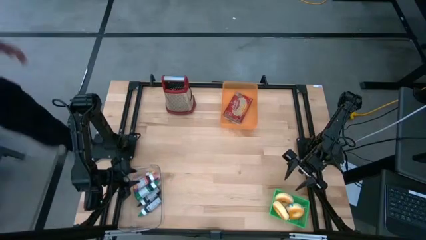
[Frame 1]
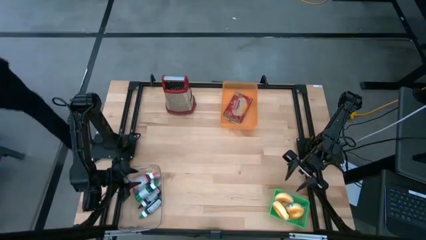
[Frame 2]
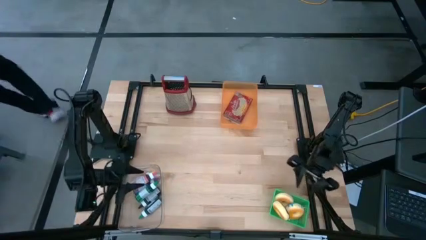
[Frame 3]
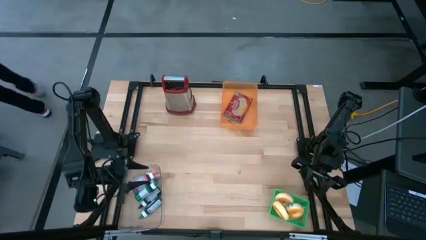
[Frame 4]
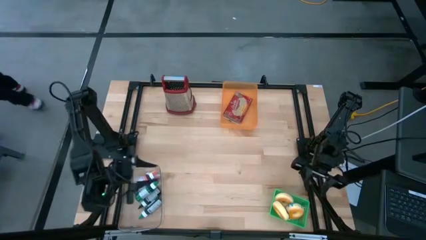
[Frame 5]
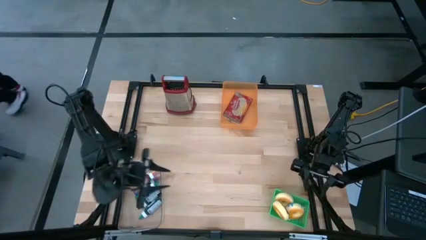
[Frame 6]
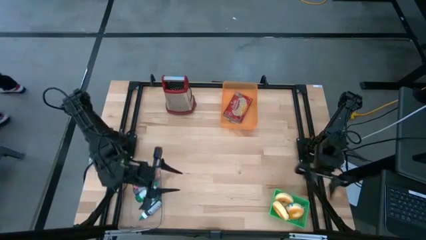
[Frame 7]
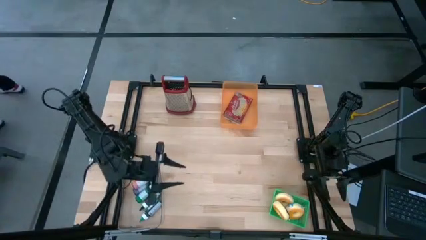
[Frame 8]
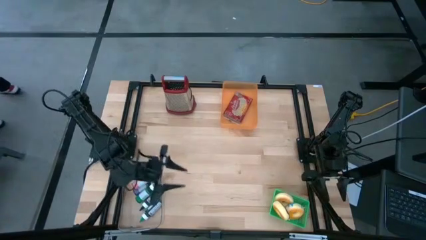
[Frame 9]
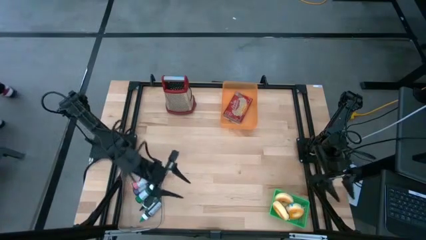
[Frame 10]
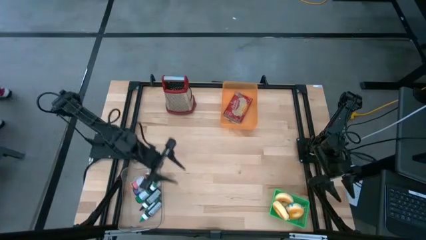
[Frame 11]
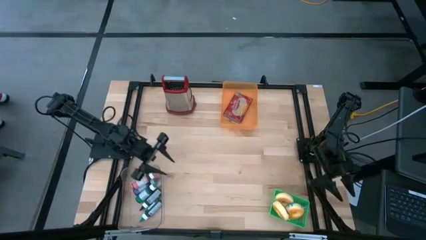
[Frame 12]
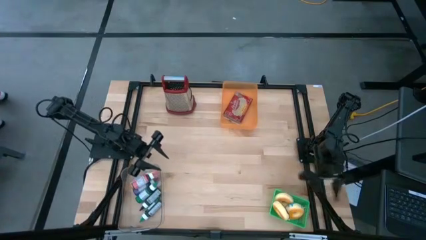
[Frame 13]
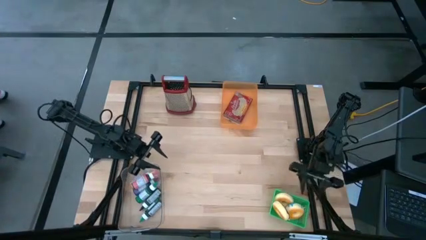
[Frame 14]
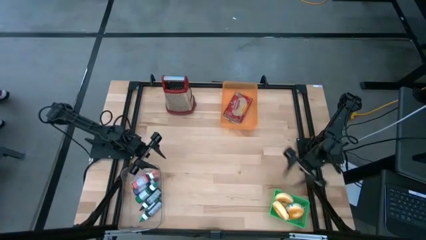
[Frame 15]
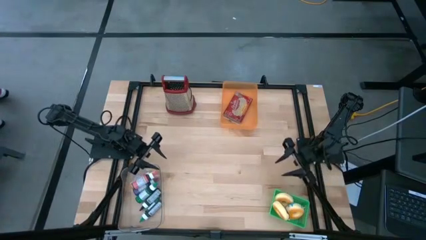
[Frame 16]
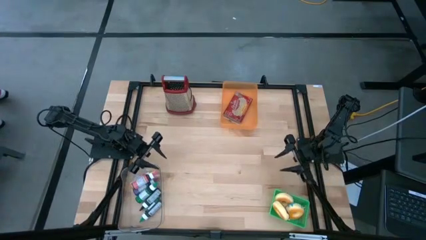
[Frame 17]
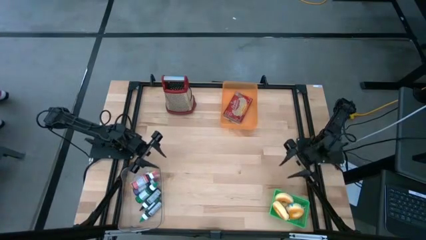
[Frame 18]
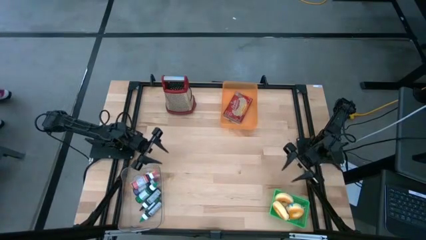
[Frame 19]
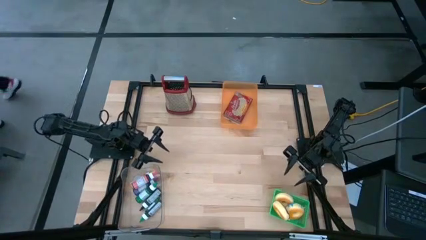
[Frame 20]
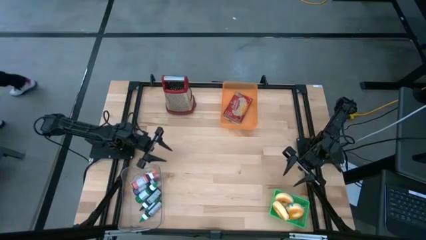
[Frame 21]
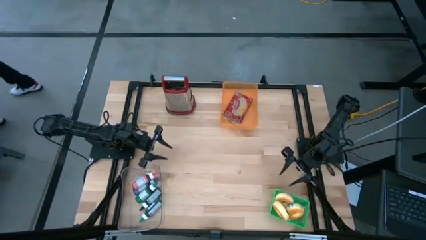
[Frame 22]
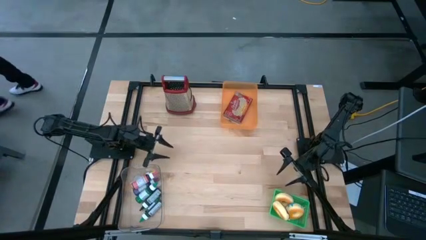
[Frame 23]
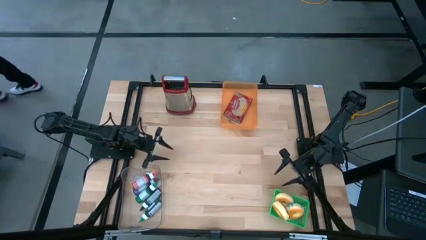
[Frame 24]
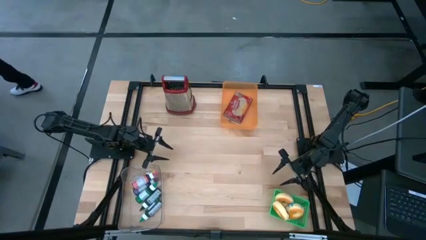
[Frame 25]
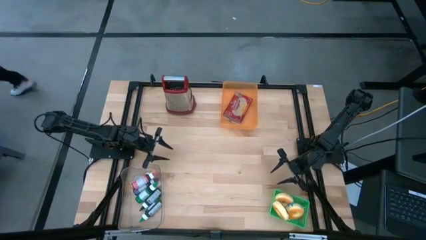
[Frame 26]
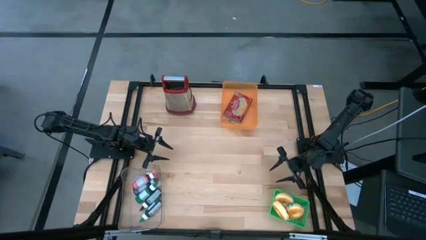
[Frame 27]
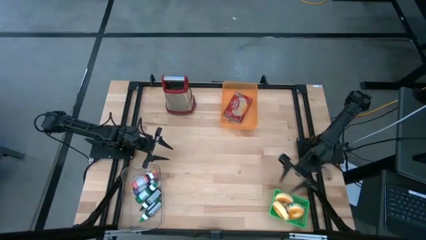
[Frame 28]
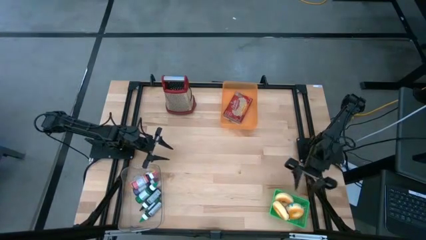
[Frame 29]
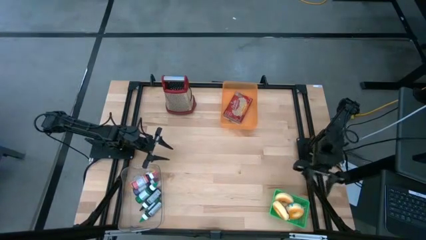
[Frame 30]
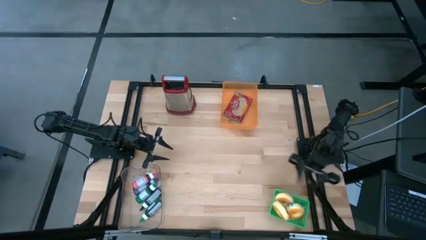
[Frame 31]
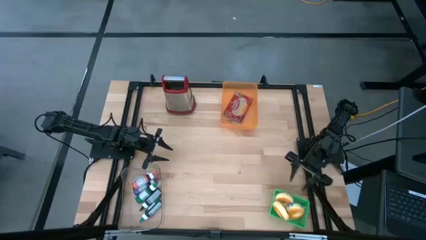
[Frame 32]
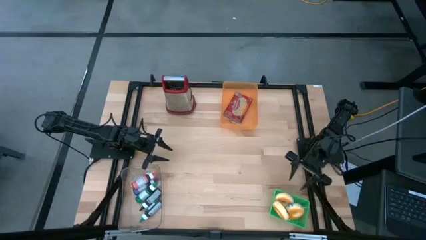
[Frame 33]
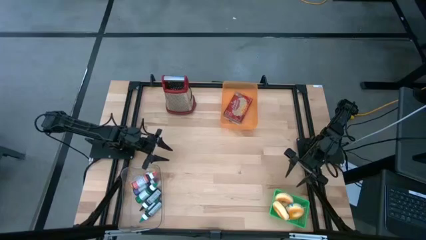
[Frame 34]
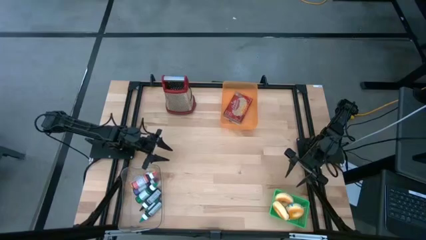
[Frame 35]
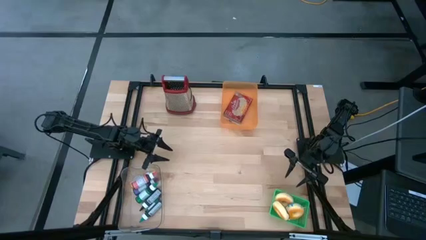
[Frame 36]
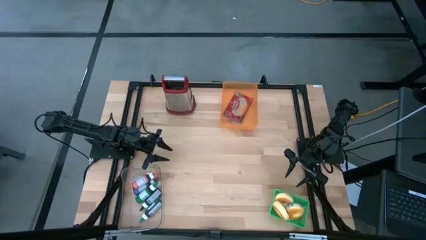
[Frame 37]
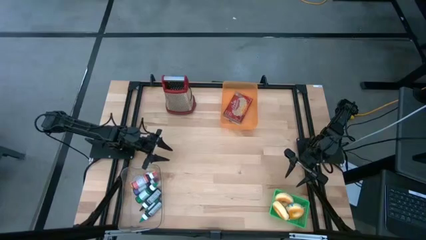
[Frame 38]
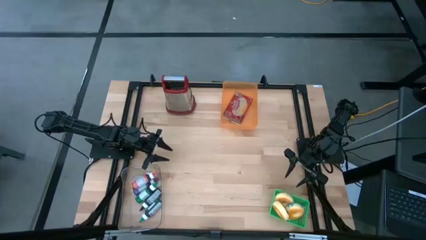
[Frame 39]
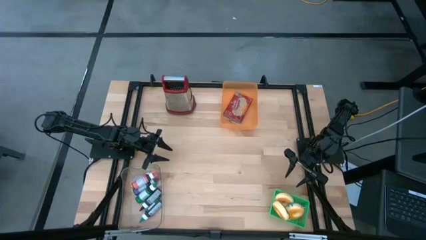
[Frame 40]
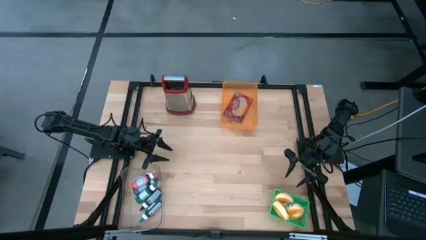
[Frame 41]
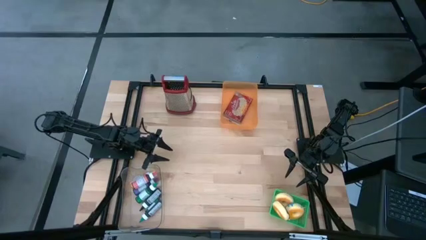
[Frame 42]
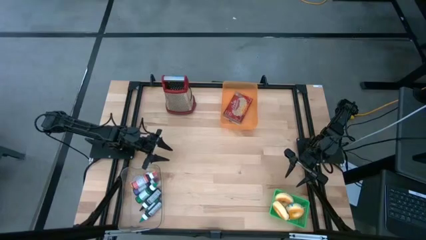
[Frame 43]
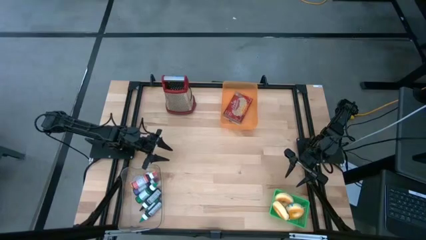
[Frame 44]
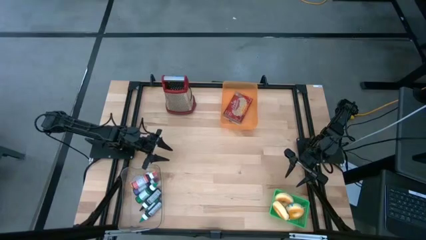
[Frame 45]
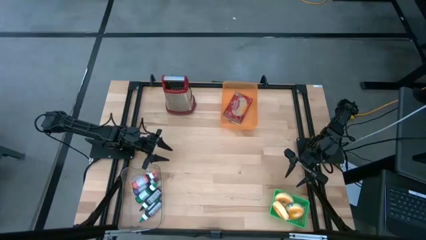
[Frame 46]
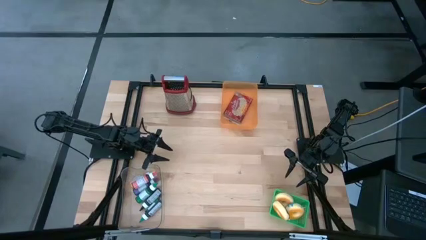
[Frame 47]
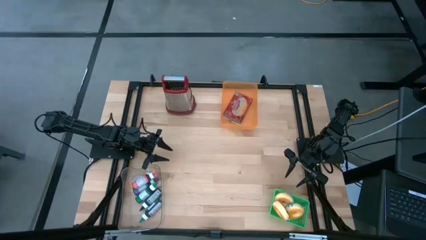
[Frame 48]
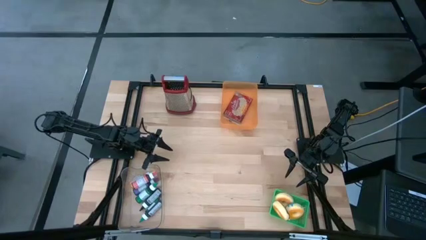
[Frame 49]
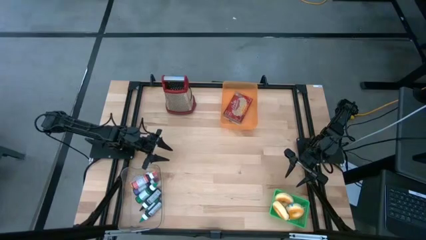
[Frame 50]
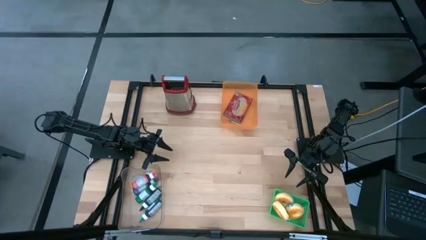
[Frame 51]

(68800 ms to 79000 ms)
Return to Home Position

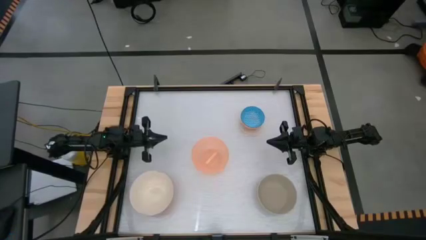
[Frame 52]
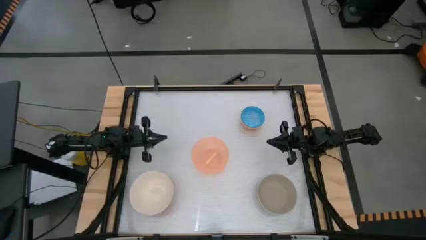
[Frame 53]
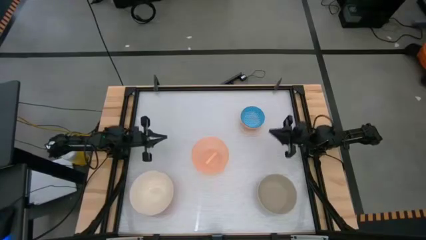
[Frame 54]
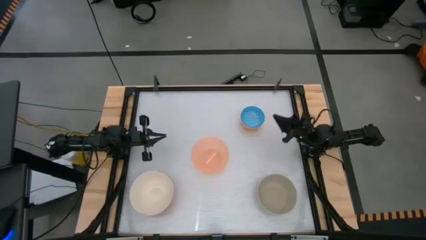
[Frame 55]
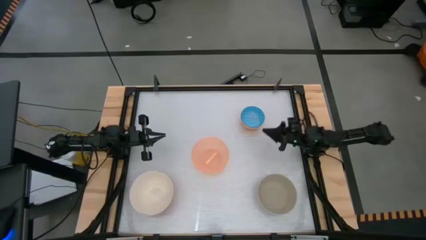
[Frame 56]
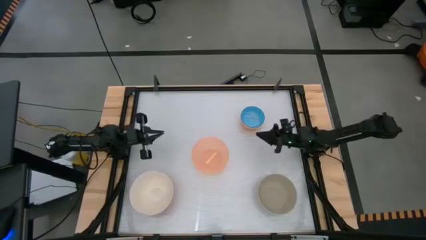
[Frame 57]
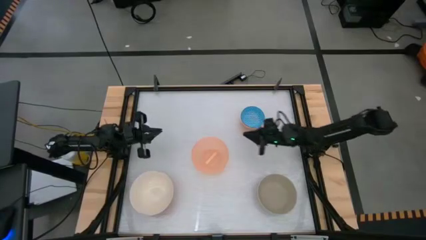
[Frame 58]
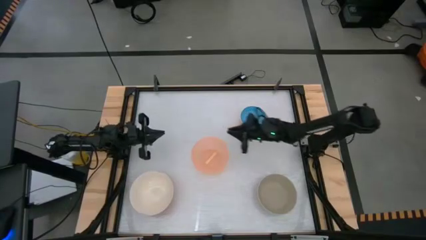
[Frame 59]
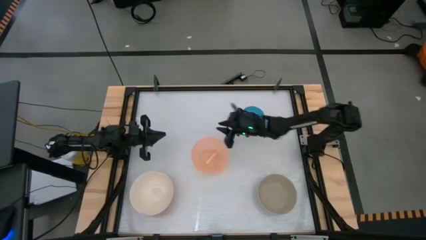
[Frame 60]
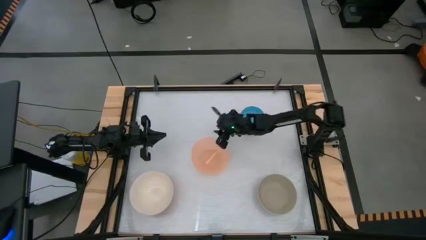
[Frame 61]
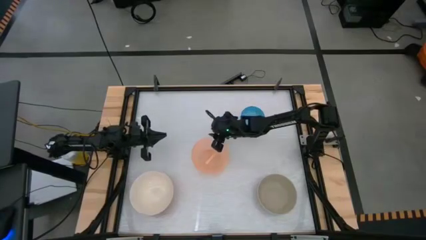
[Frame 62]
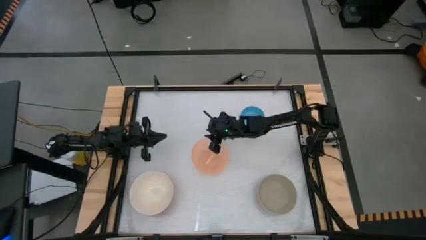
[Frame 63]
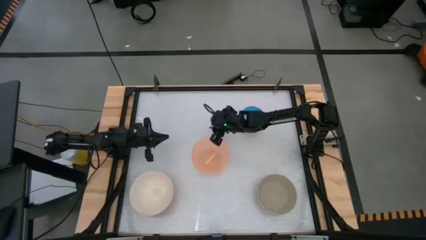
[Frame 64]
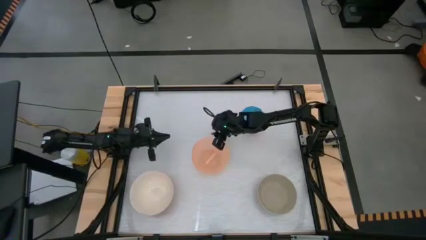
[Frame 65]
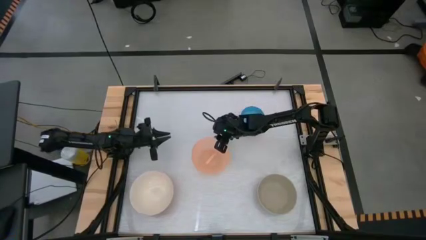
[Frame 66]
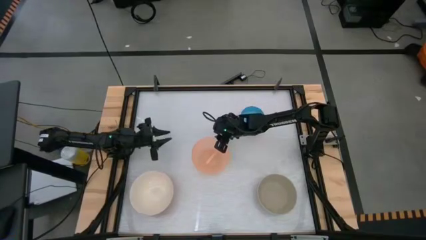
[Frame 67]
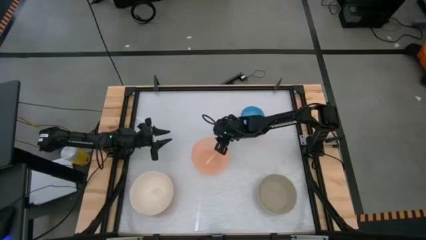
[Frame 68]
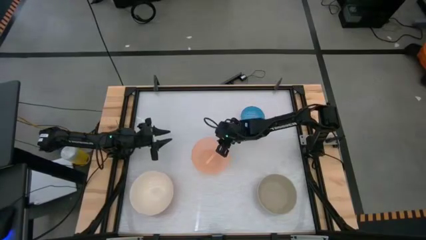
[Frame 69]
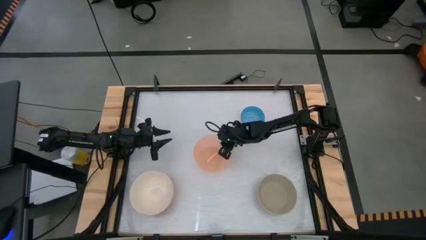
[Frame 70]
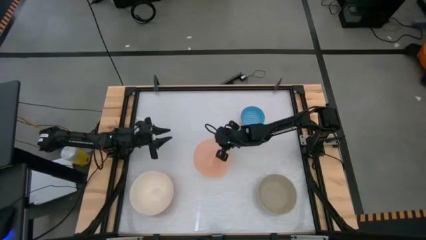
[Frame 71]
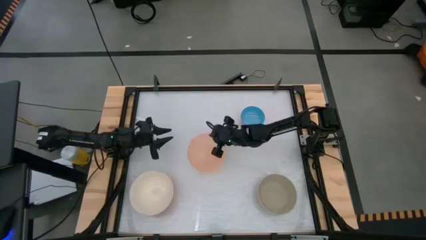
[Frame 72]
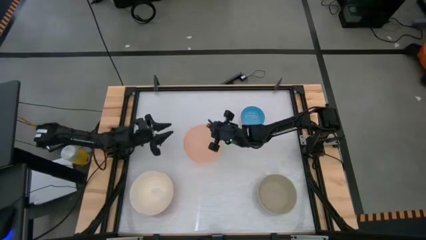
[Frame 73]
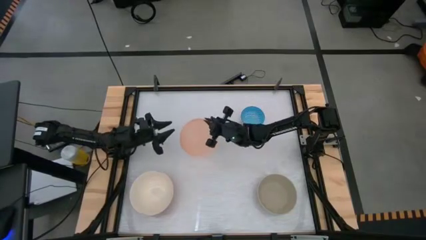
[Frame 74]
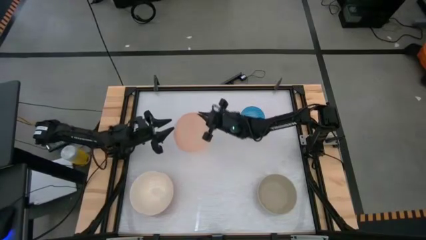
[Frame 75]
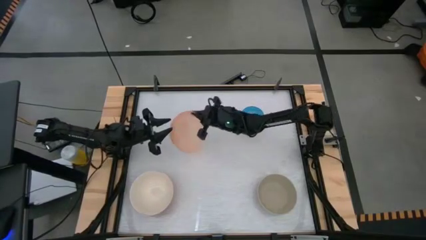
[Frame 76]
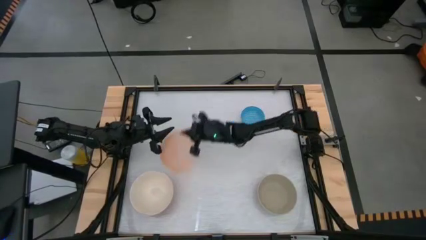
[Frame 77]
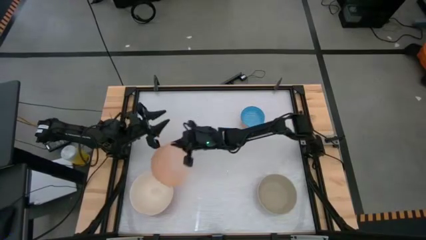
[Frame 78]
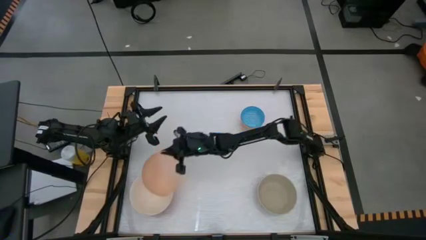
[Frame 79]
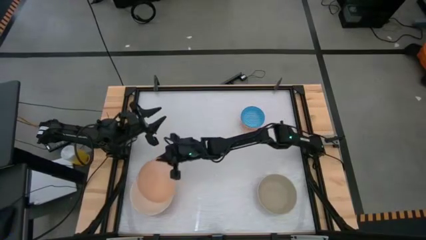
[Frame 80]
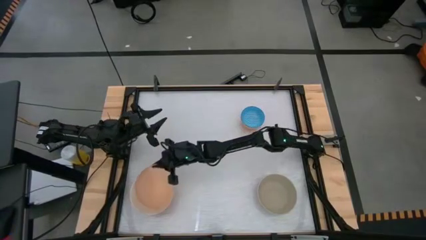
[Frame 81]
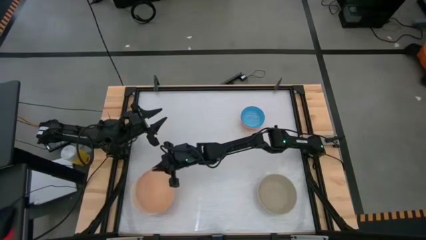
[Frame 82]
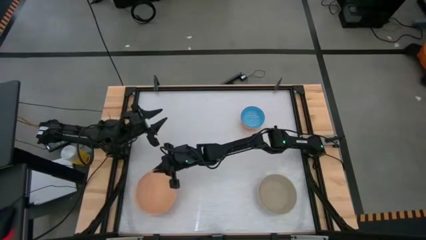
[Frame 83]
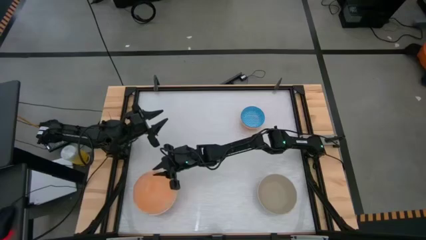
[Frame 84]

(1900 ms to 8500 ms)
Stack the orange bowl into the white bowl
